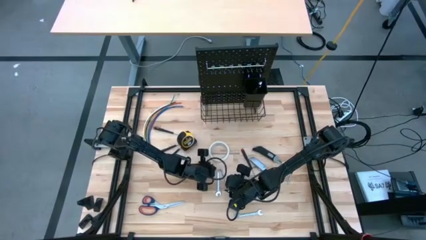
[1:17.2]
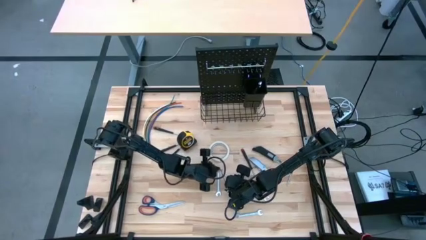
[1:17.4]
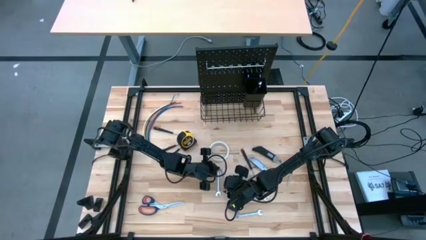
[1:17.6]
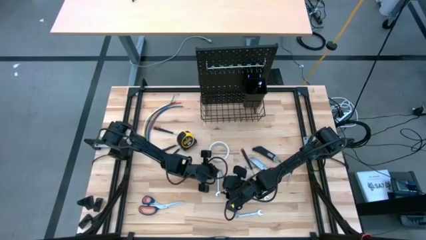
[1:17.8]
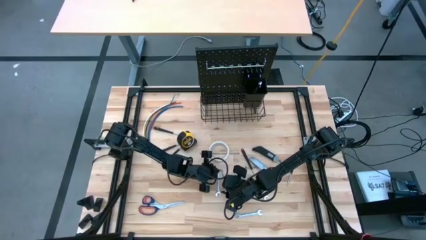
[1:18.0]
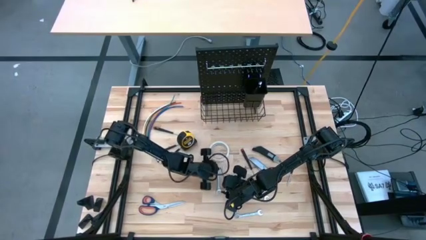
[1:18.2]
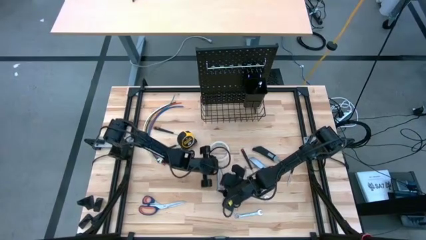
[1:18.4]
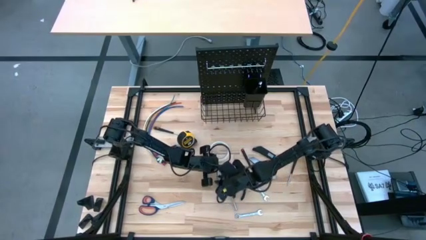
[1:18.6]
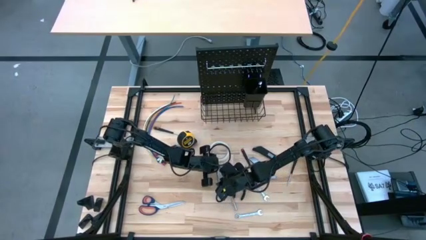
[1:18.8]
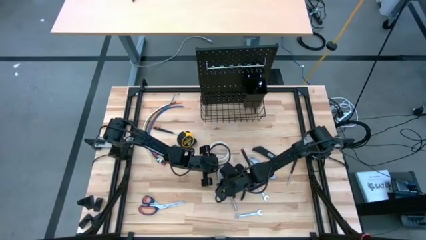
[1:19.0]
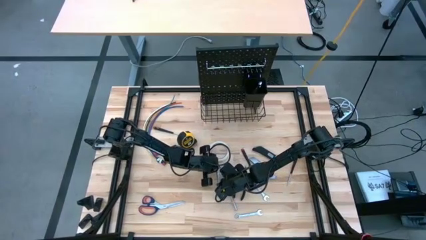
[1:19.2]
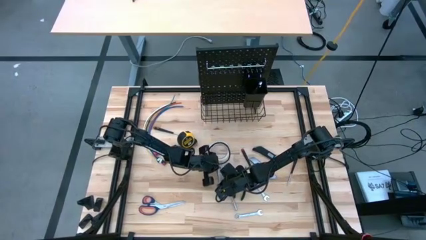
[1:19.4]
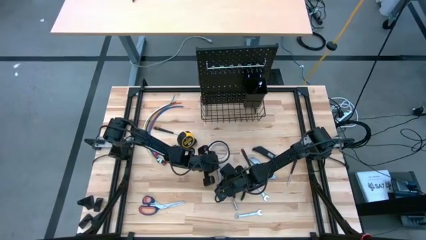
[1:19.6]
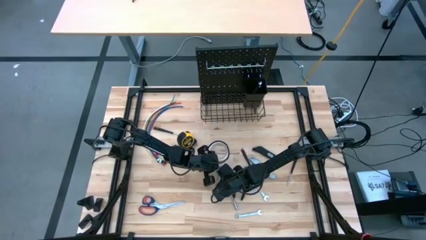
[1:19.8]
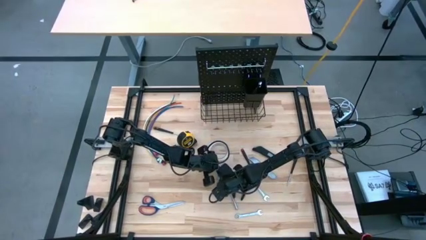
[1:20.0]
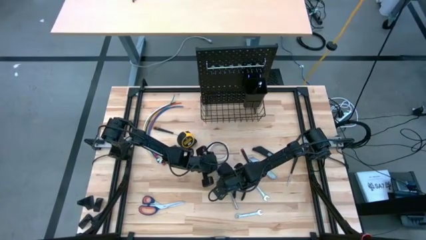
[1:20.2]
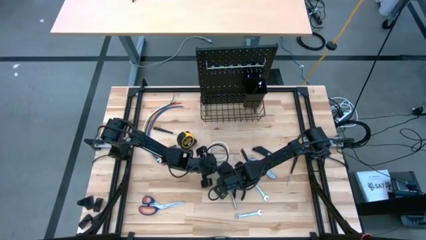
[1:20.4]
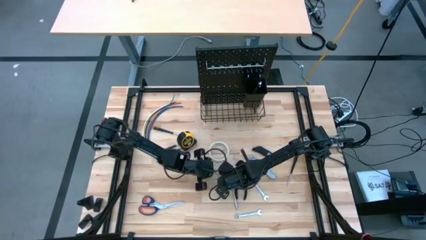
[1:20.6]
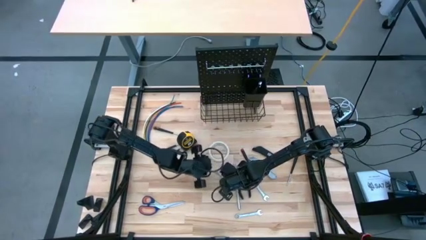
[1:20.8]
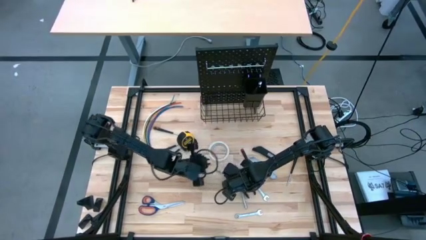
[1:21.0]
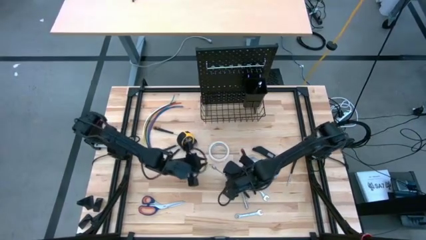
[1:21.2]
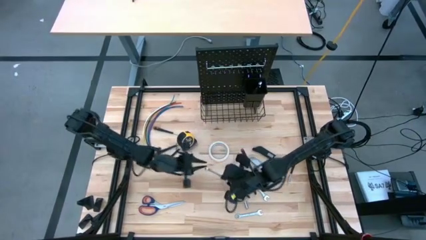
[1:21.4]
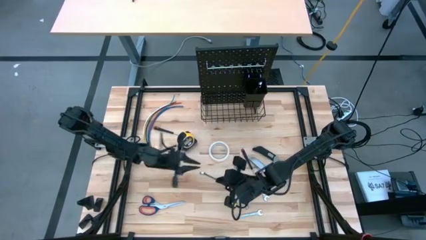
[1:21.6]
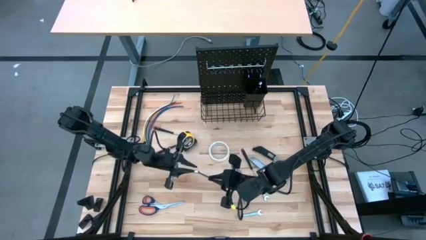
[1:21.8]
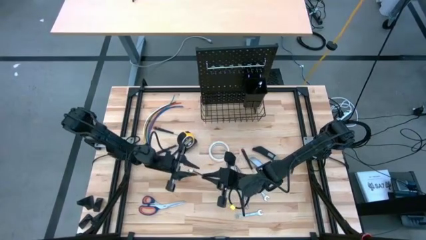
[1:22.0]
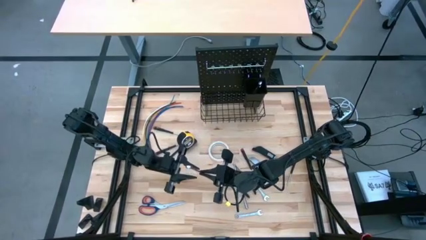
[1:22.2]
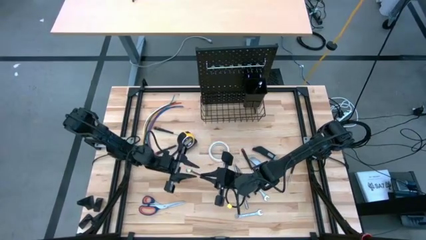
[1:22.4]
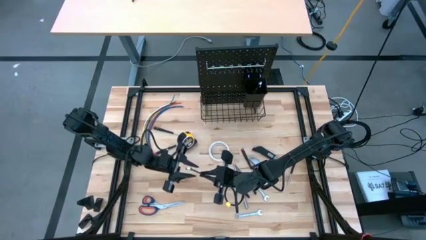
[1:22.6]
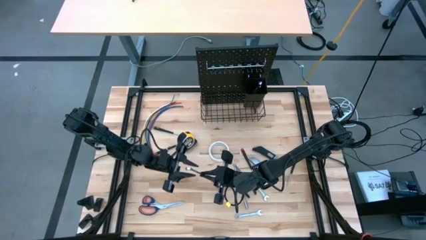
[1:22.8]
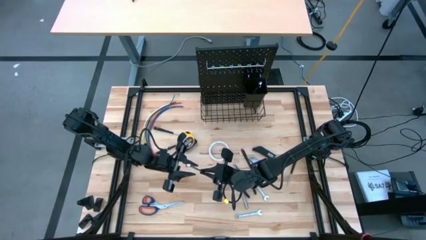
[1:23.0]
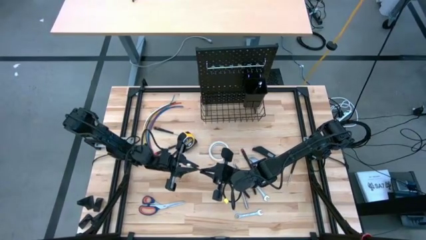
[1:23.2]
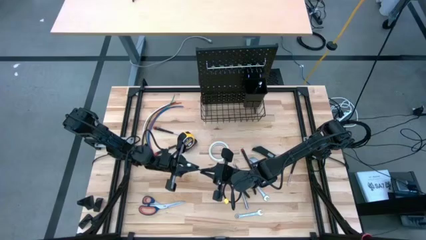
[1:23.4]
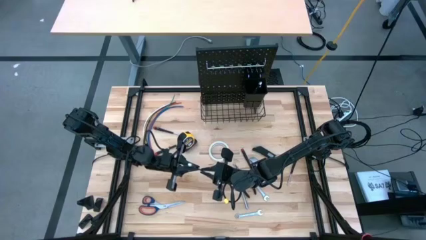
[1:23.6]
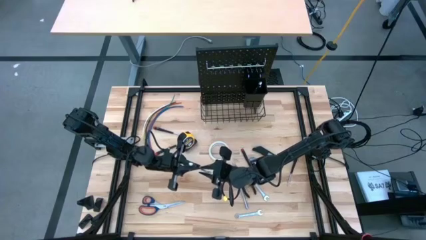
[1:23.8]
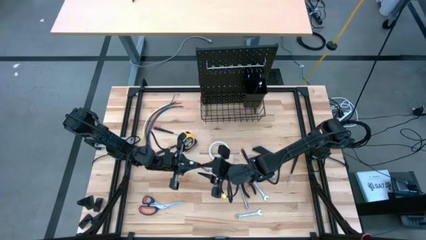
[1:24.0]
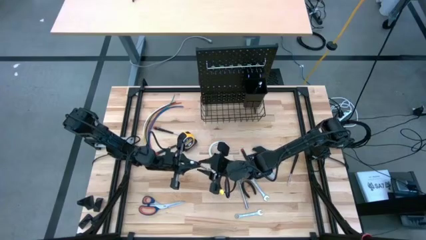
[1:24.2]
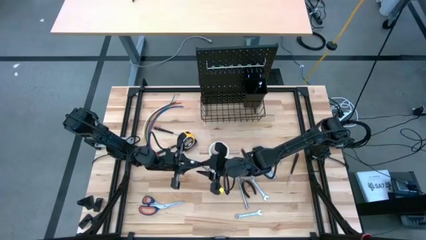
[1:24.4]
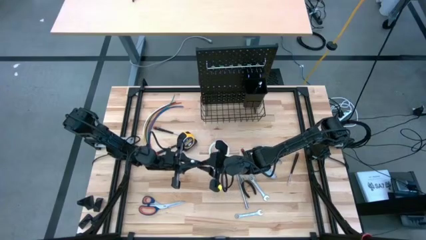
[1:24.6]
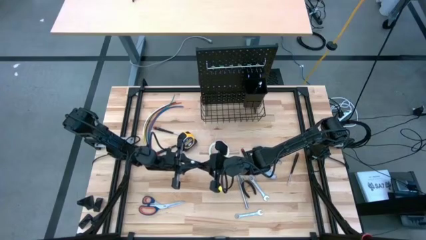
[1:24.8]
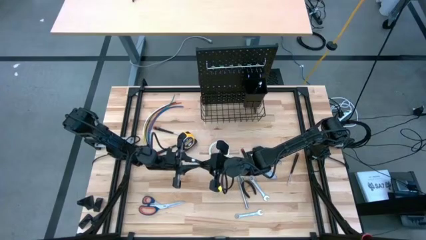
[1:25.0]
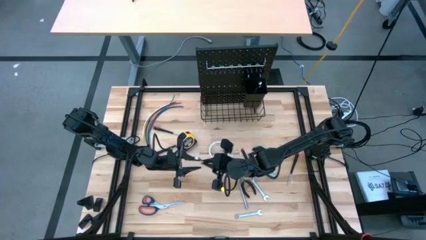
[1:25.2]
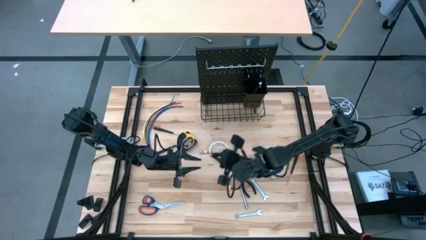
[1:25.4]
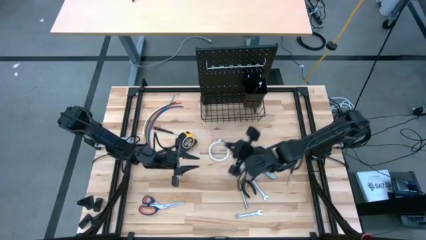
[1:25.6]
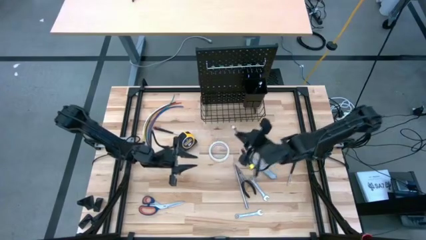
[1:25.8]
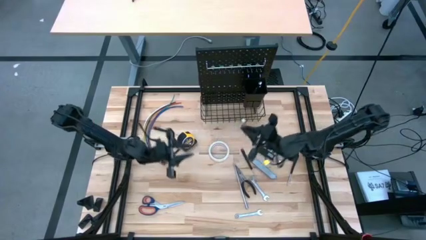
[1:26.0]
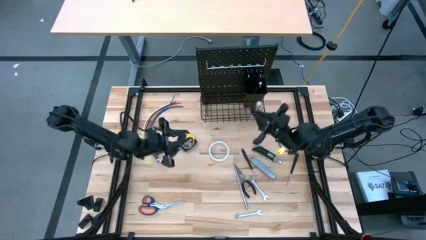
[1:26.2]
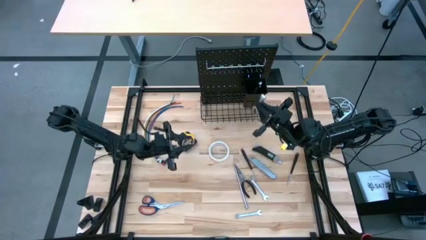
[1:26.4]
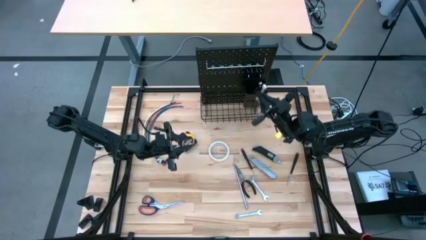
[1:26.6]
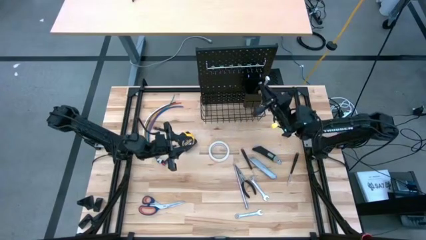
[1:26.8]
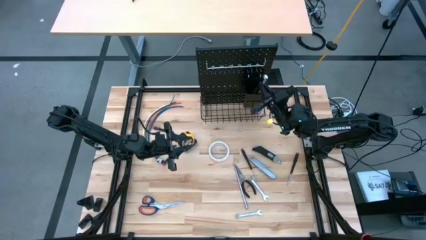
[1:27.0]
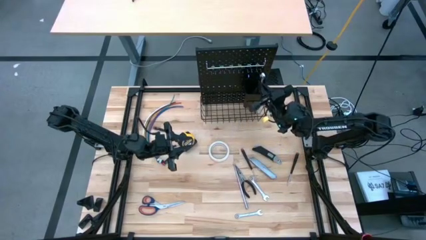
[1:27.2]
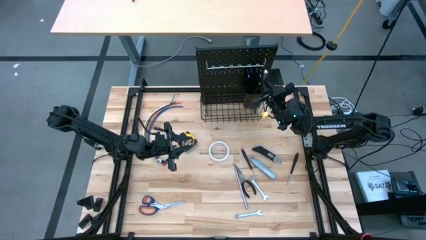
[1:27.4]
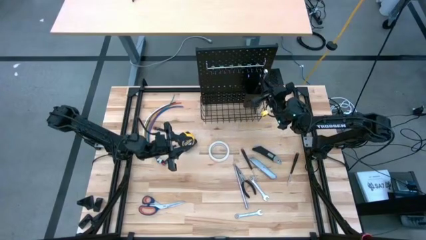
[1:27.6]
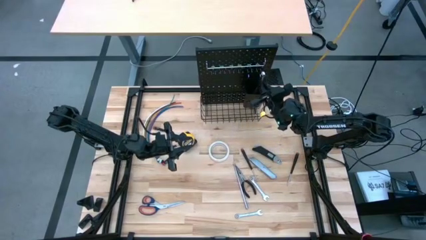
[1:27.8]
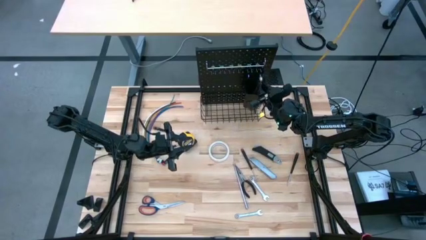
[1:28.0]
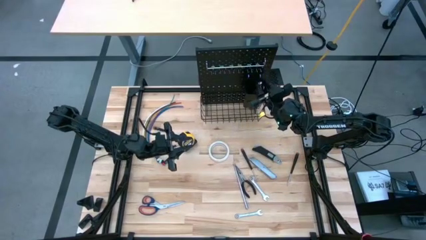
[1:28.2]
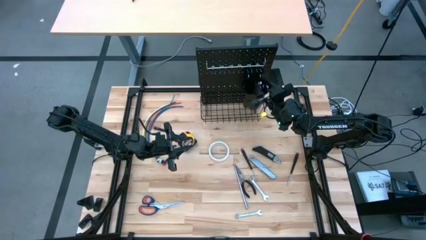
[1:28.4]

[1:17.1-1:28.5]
Task: Hang tools onto peg board
Put the wrench into the black bin on the peg board
